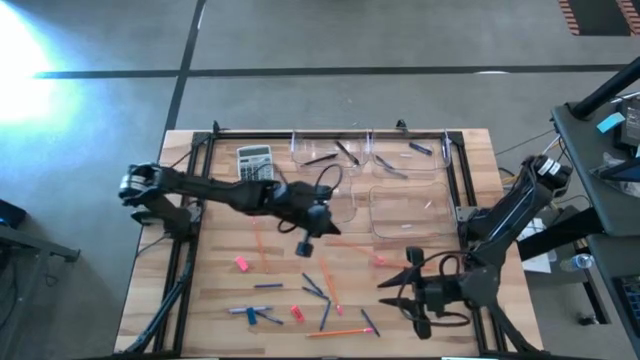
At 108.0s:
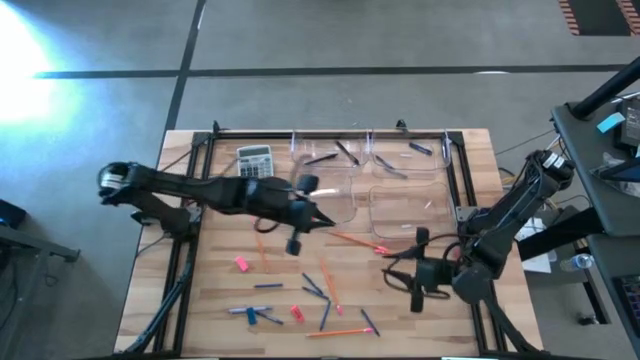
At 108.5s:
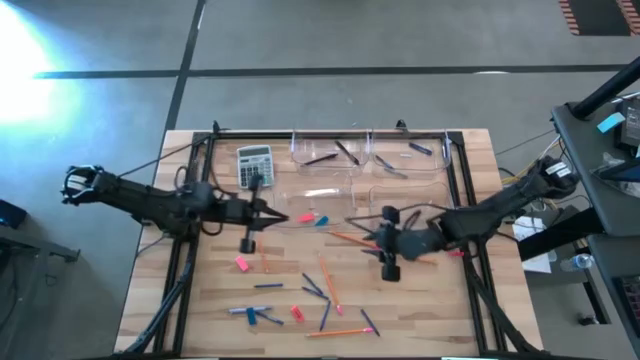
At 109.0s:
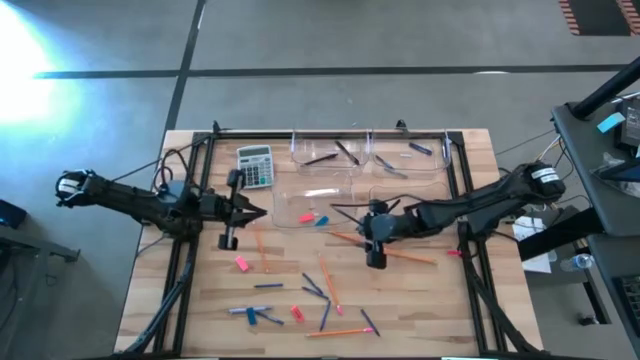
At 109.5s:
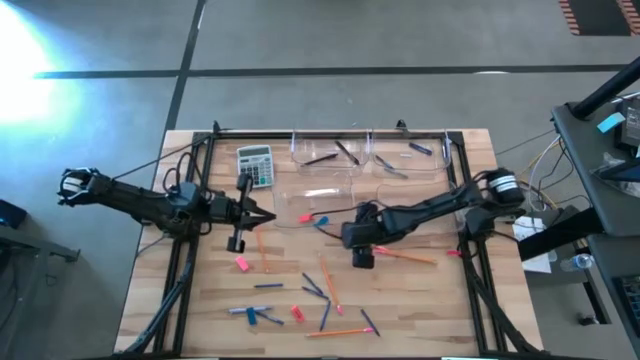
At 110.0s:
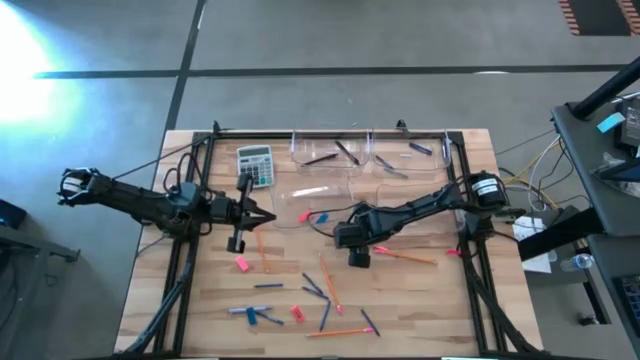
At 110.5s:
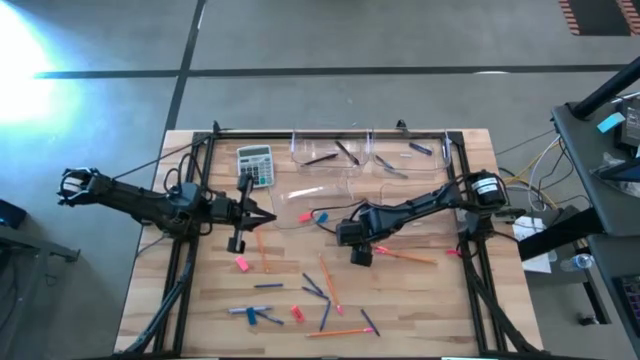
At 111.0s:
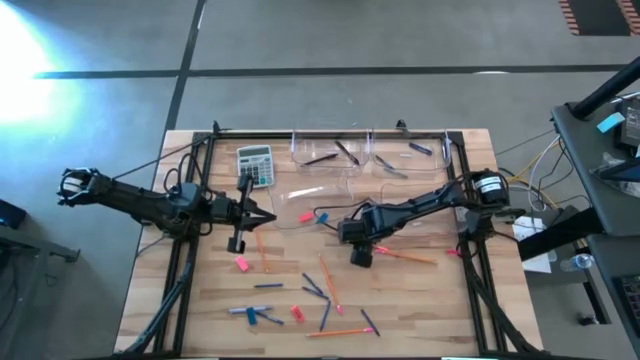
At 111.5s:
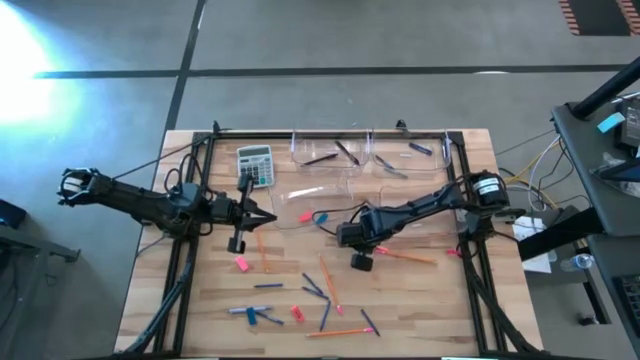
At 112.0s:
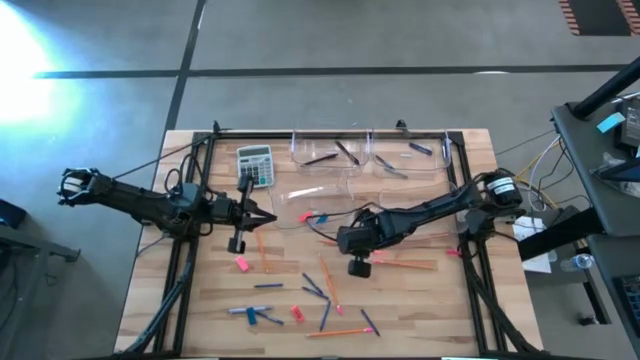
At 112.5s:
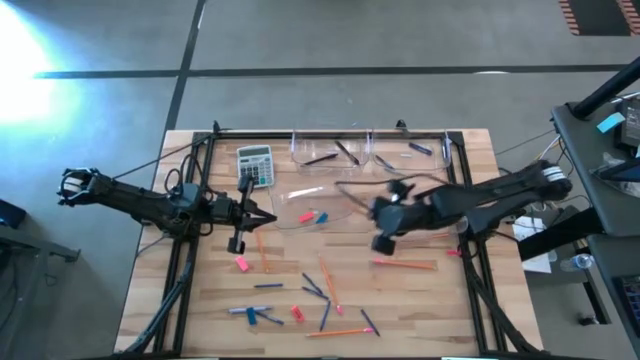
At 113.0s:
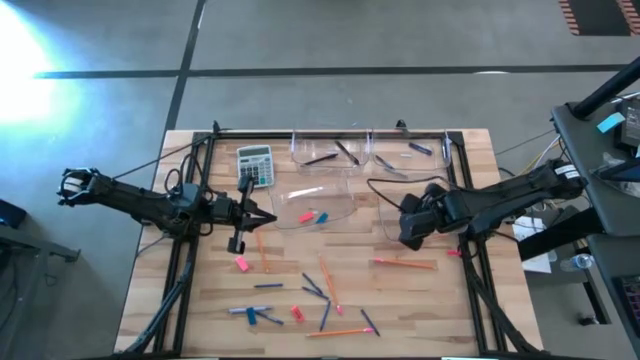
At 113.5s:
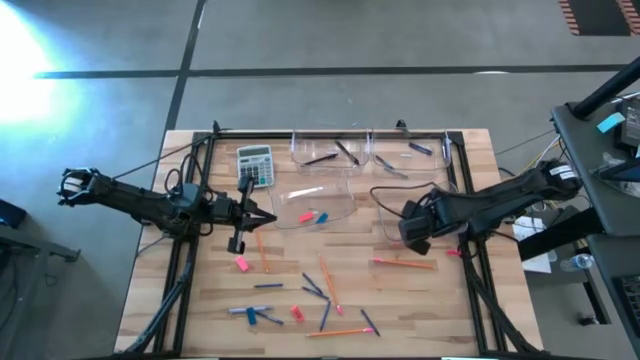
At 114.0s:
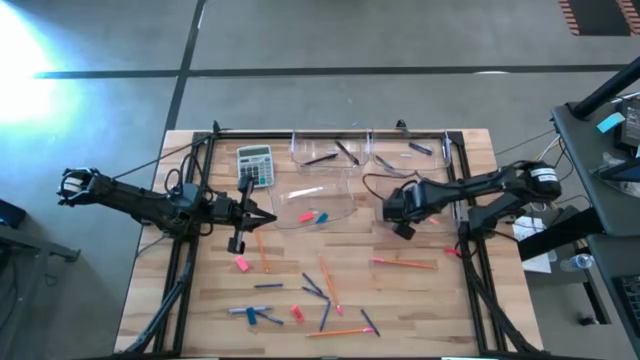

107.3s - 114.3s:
Task: Sort crayons/erasers/pens/pencils in bins
Put the orange pencil into the bottom right transparent bin

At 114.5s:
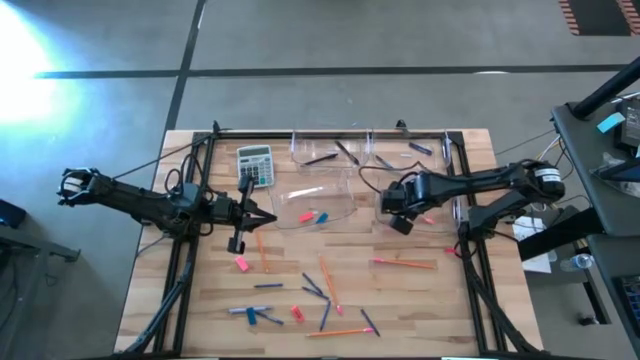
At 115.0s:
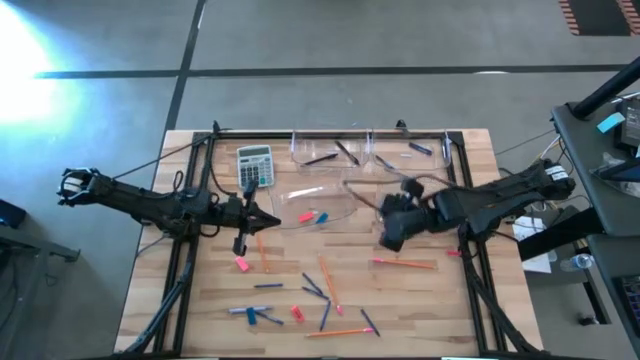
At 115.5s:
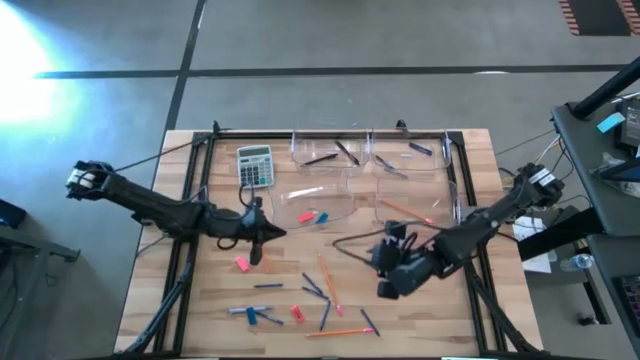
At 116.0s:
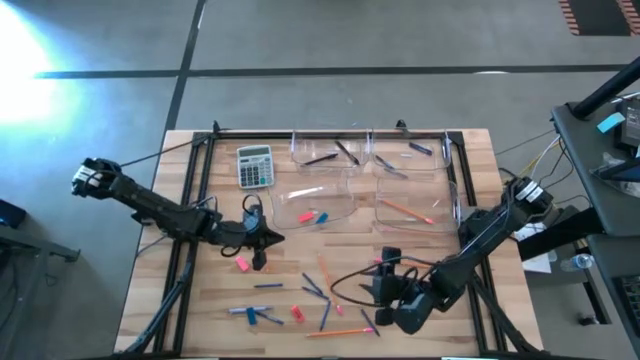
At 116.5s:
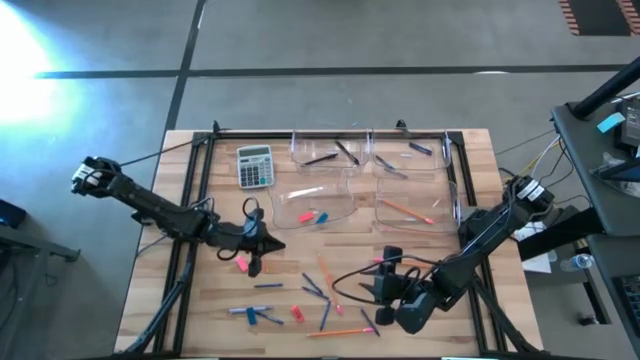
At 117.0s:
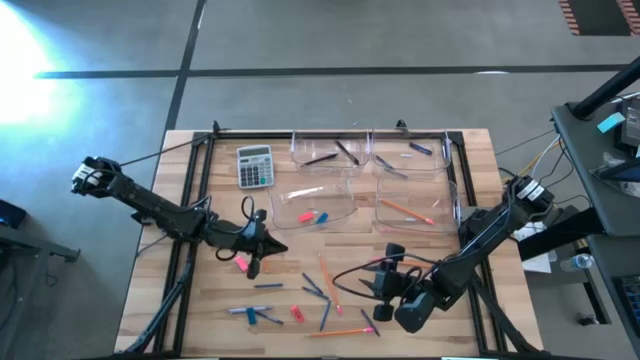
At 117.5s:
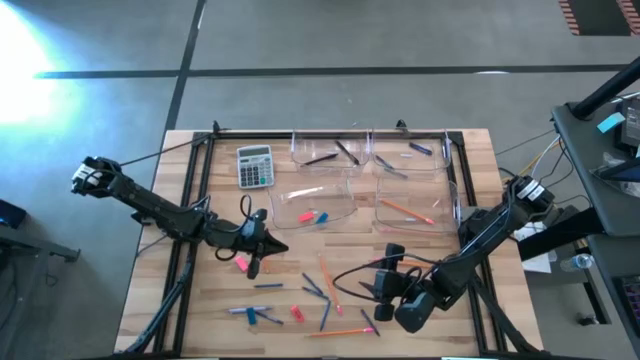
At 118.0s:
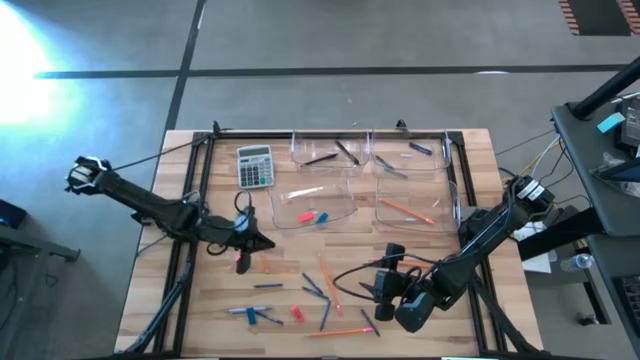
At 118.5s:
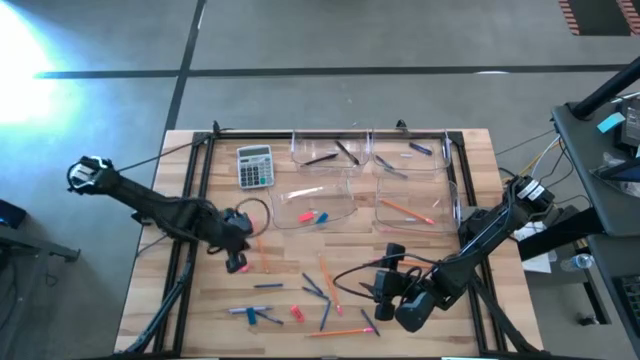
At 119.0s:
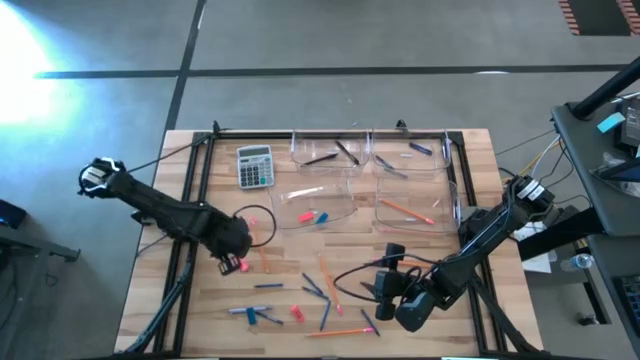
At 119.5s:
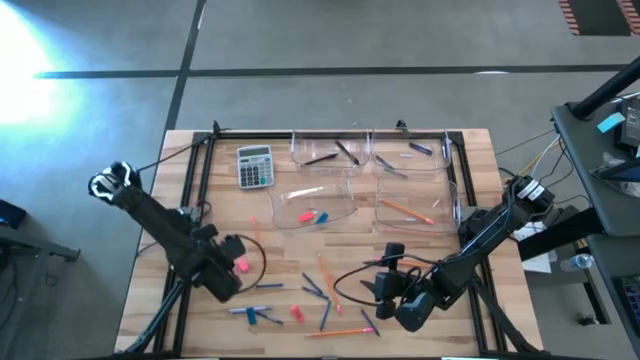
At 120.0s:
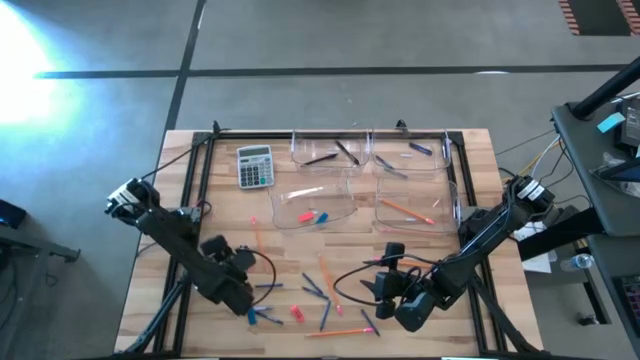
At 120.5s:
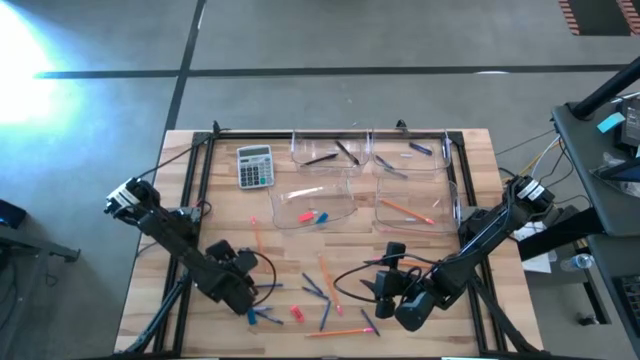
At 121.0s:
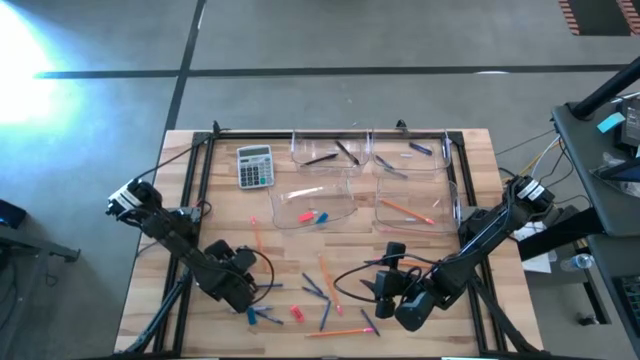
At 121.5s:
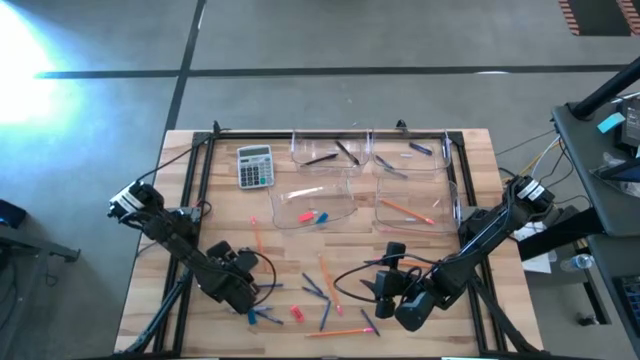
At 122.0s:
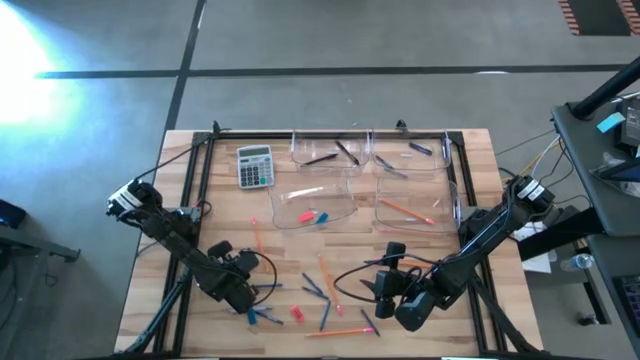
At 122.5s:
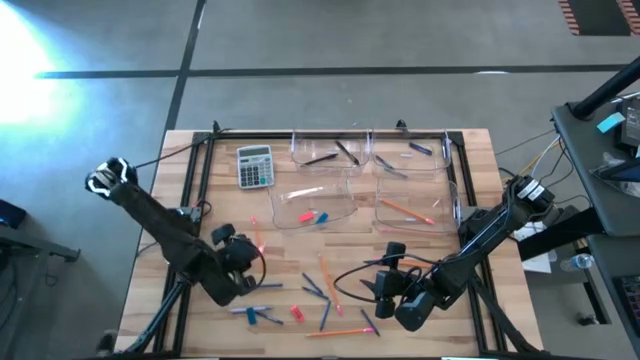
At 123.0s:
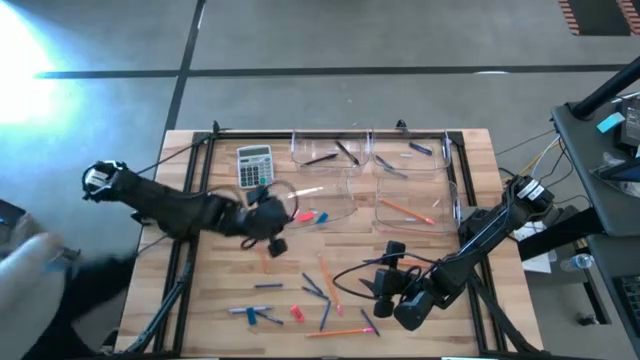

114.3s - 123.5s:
Put the pink eraser into the bottom left transparent bin

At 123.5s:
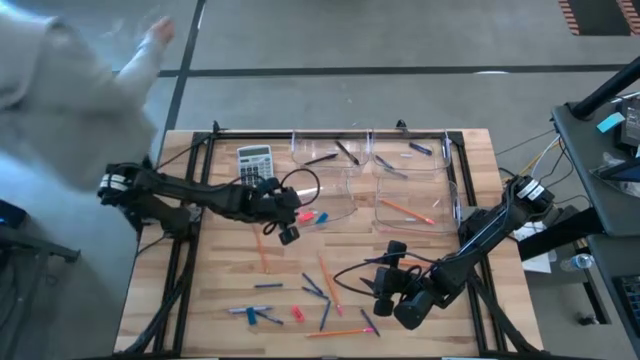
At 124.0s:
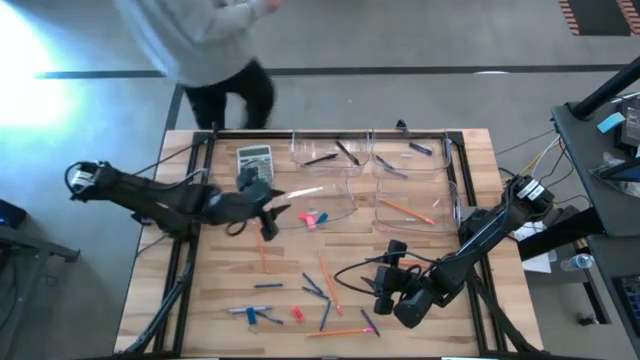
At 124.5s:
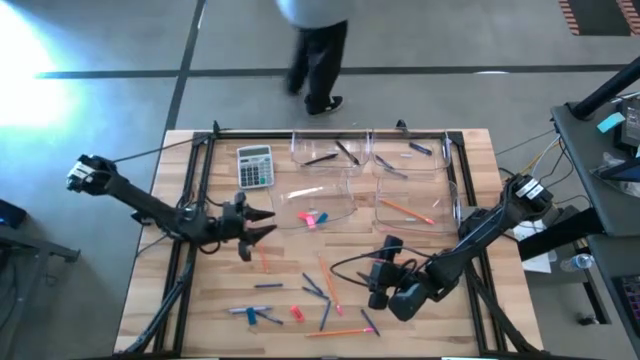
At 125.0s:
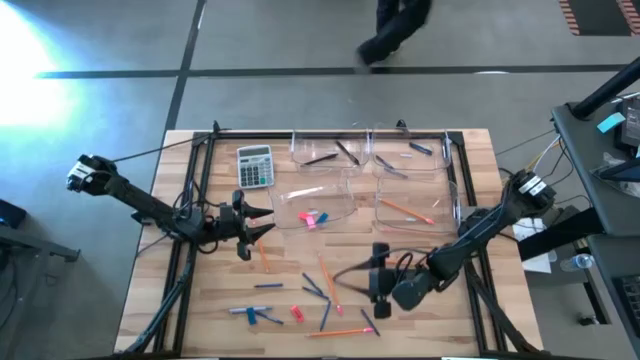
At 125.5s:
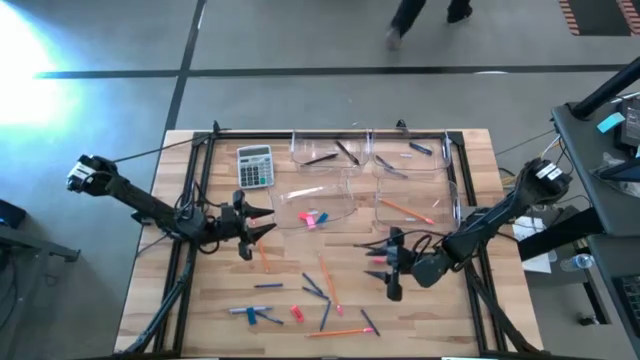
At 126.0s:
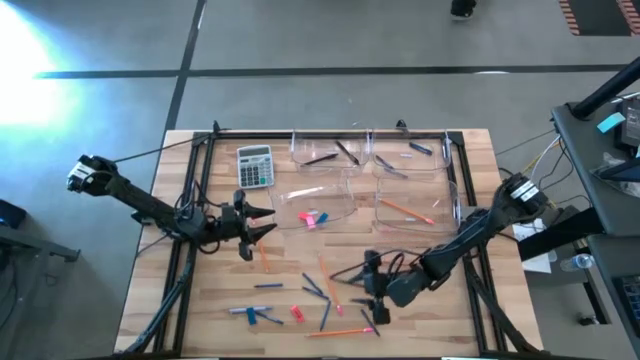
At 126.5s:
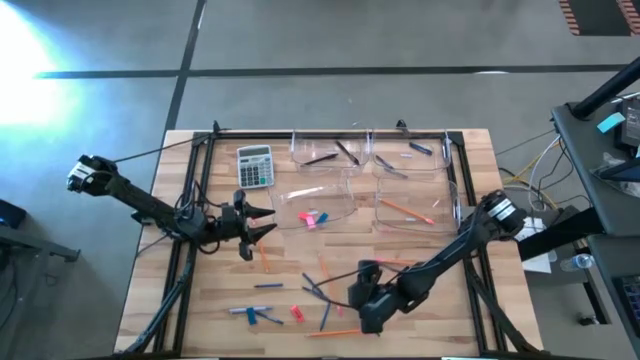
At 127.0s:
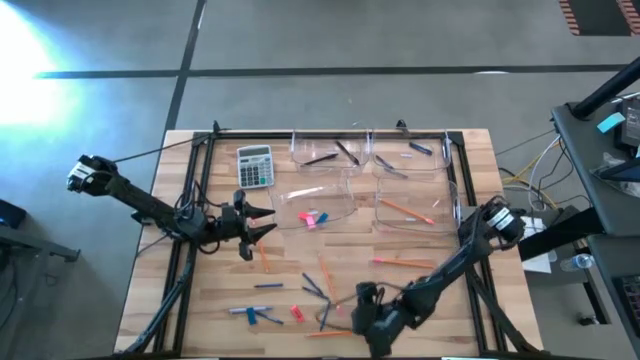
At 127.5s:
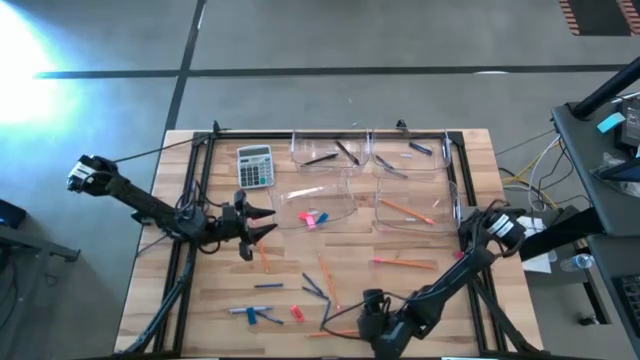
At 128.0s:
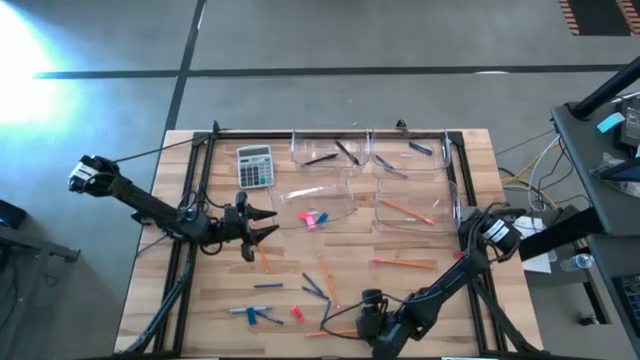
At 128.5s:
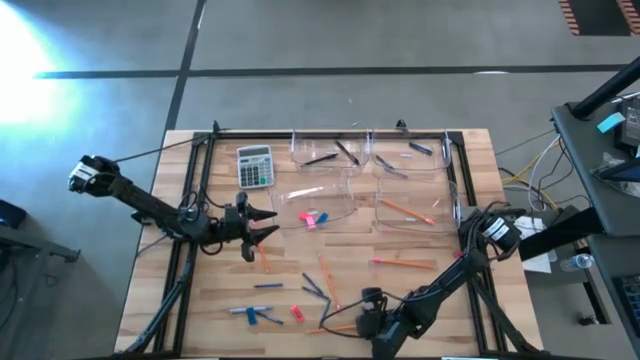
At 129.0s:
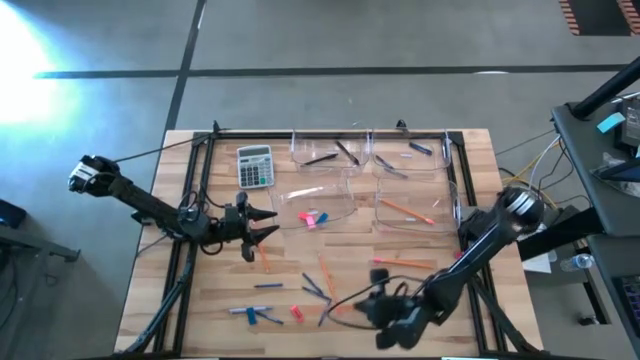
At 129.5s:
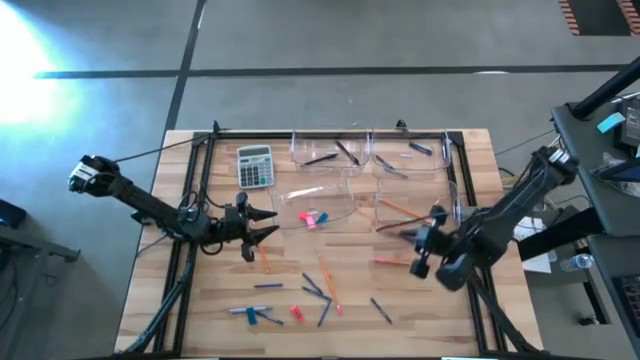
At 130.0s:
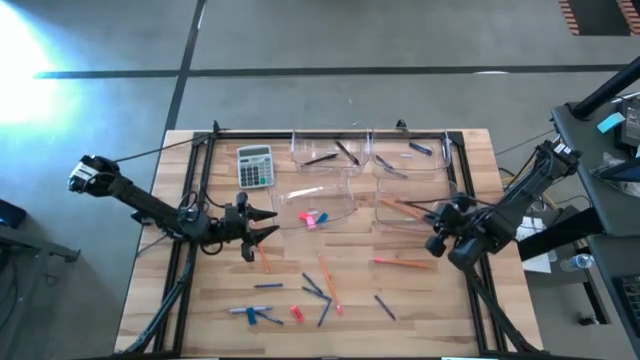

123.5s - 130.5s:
Put the orange pencil into the bottom right transparent bin
